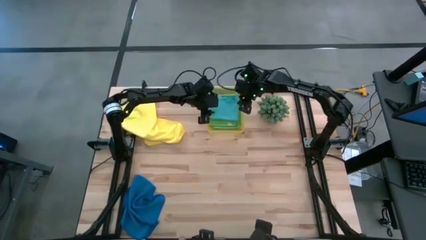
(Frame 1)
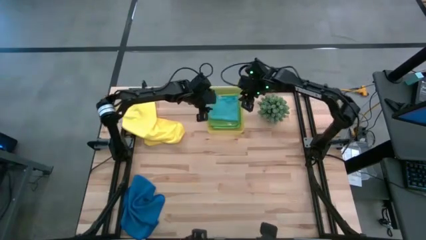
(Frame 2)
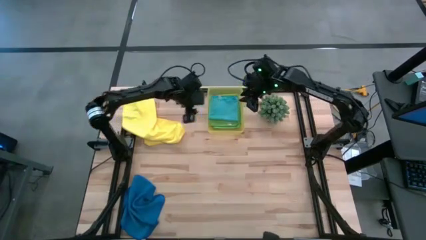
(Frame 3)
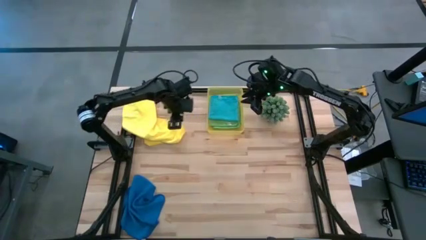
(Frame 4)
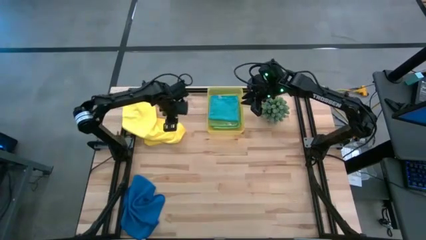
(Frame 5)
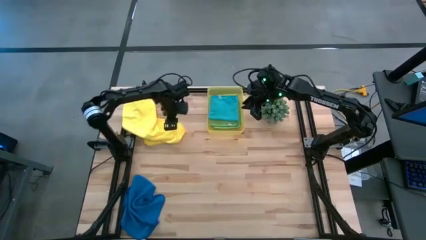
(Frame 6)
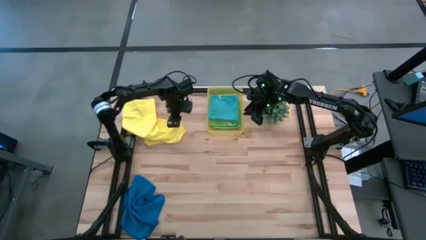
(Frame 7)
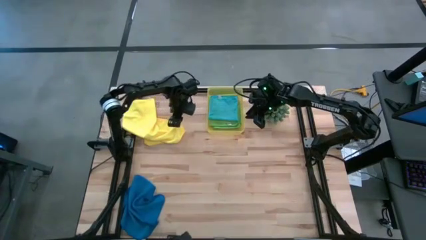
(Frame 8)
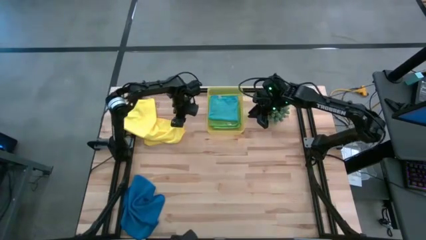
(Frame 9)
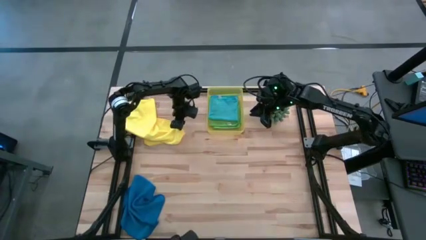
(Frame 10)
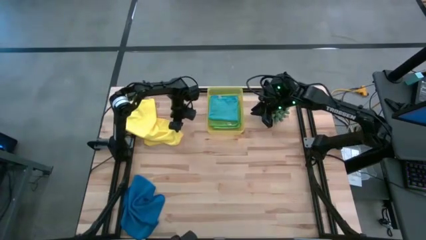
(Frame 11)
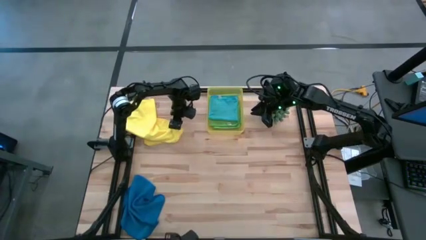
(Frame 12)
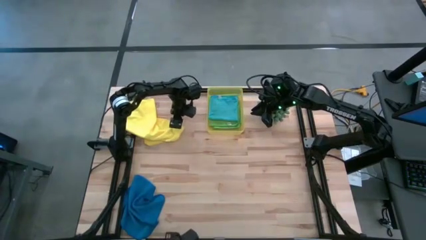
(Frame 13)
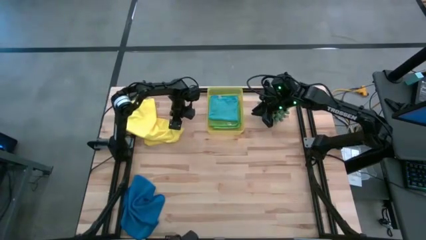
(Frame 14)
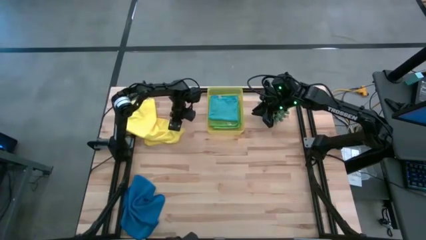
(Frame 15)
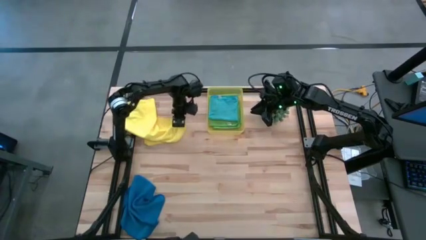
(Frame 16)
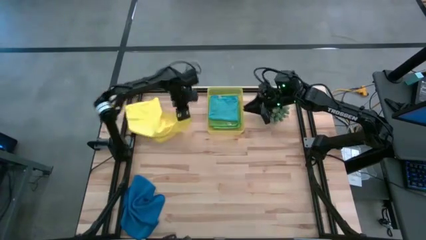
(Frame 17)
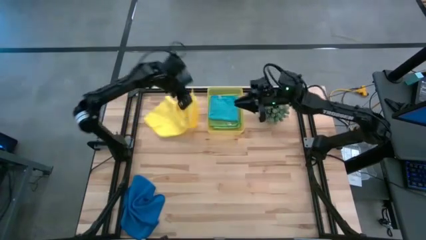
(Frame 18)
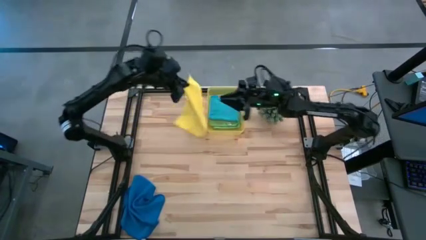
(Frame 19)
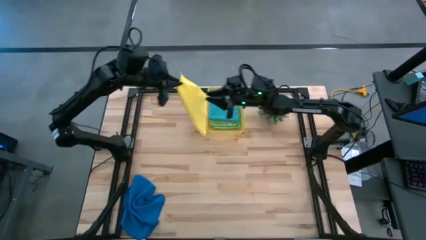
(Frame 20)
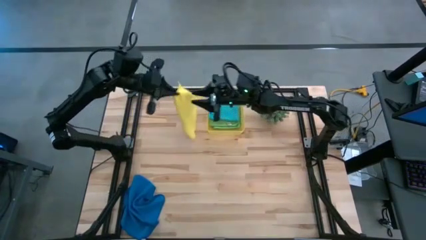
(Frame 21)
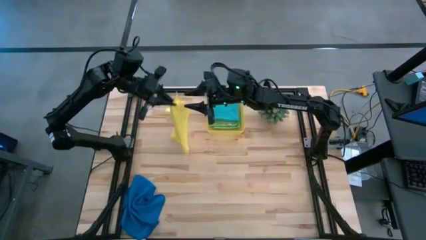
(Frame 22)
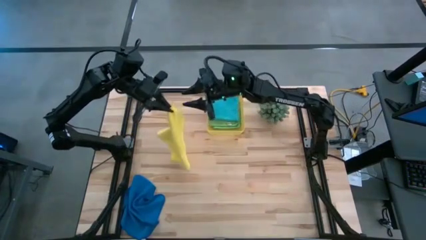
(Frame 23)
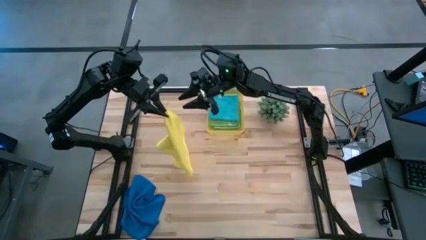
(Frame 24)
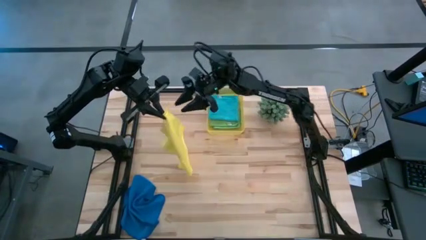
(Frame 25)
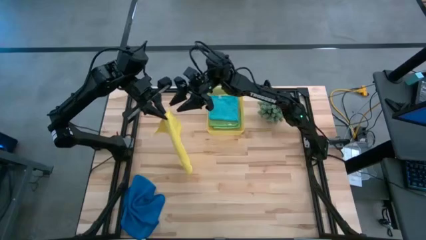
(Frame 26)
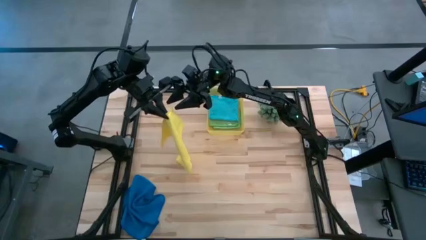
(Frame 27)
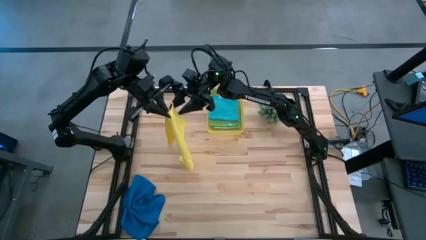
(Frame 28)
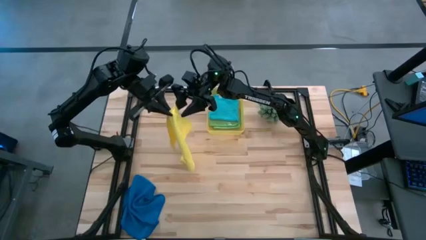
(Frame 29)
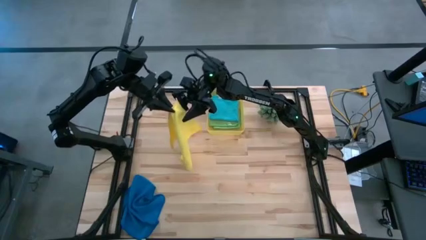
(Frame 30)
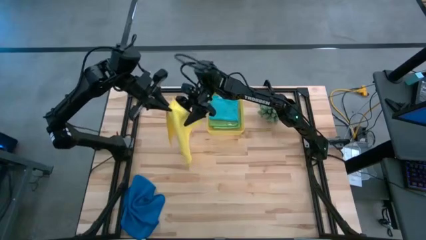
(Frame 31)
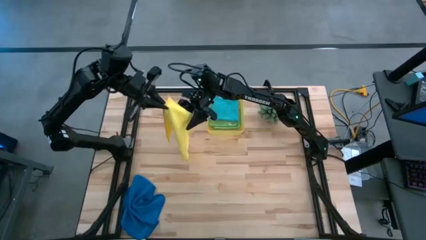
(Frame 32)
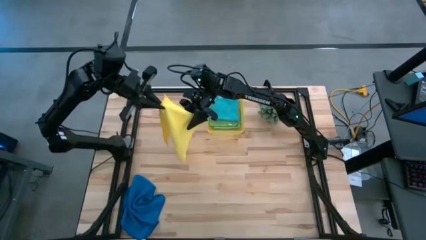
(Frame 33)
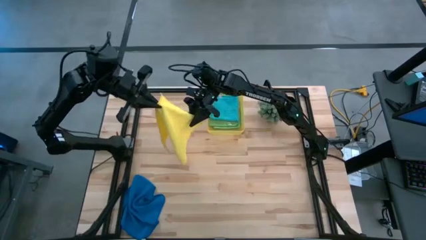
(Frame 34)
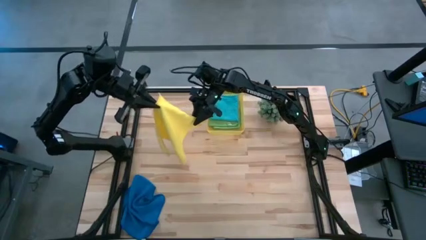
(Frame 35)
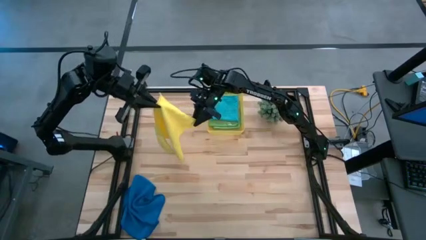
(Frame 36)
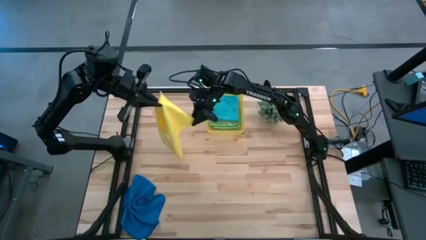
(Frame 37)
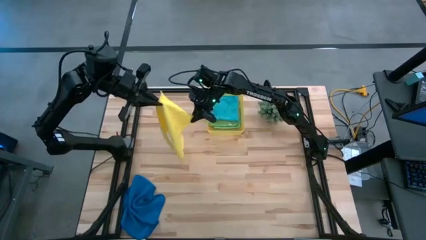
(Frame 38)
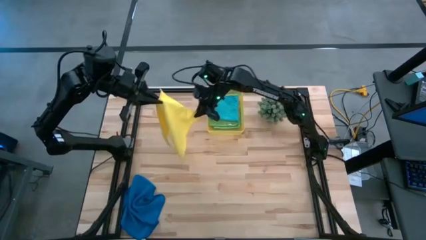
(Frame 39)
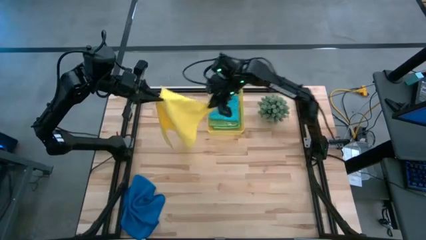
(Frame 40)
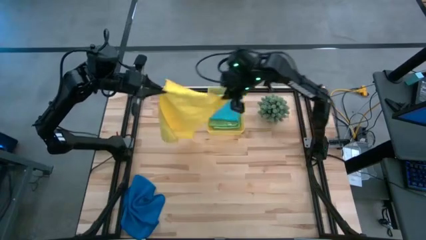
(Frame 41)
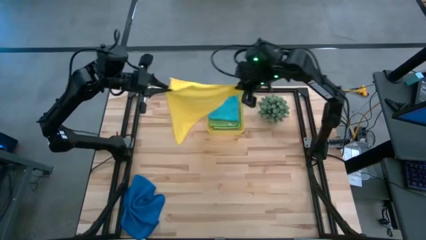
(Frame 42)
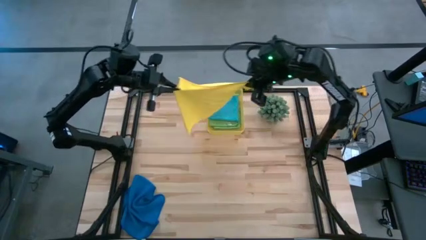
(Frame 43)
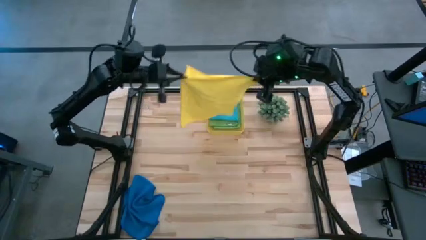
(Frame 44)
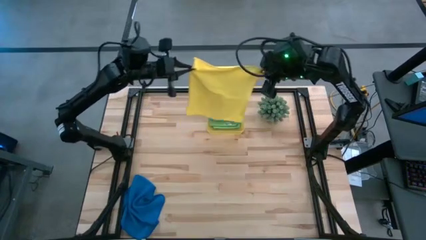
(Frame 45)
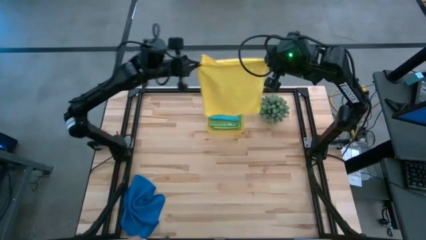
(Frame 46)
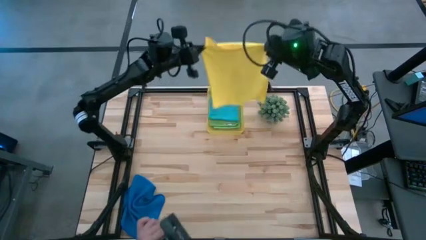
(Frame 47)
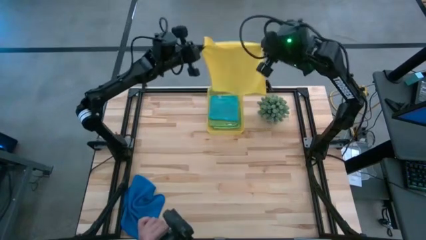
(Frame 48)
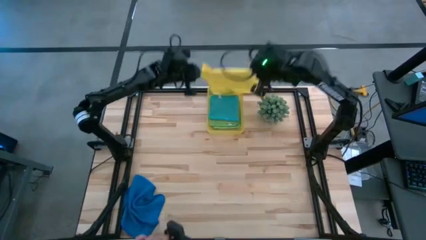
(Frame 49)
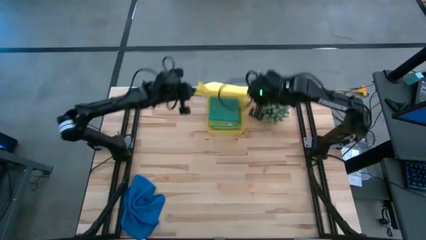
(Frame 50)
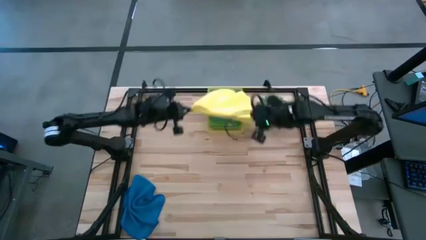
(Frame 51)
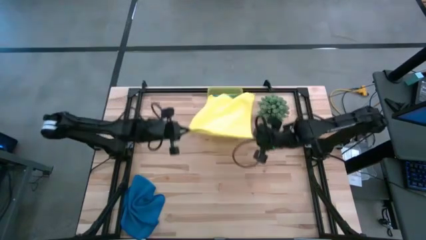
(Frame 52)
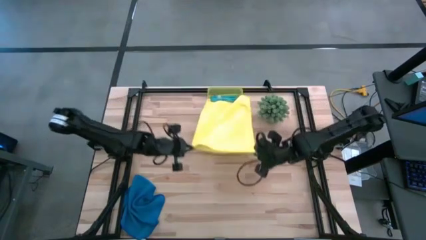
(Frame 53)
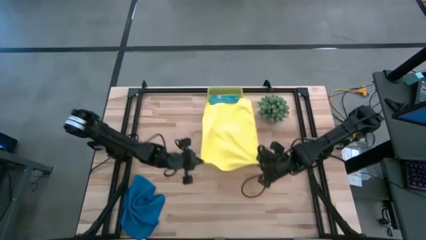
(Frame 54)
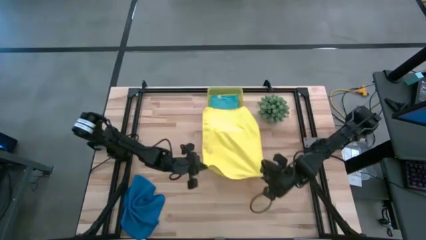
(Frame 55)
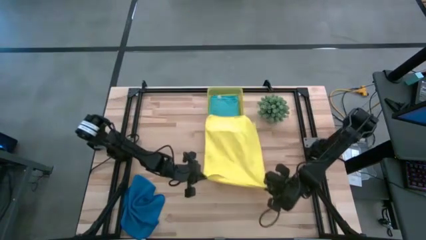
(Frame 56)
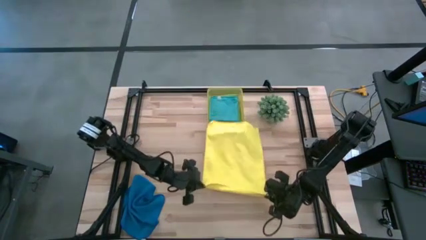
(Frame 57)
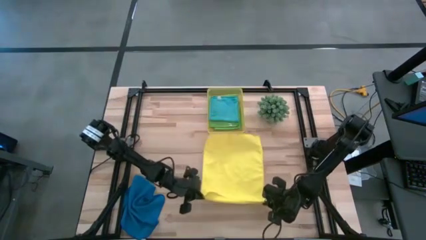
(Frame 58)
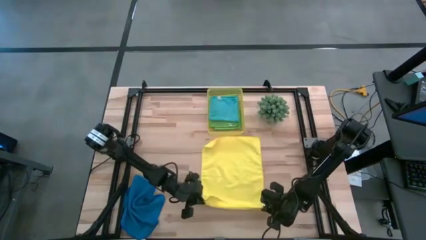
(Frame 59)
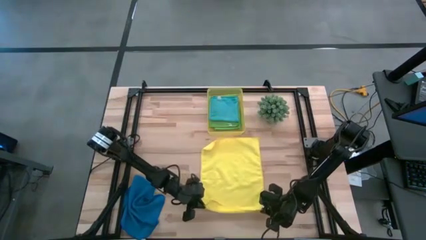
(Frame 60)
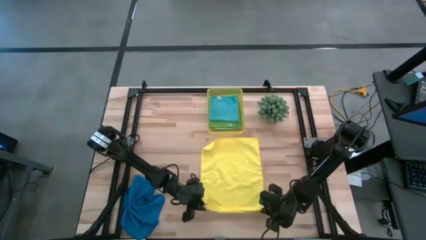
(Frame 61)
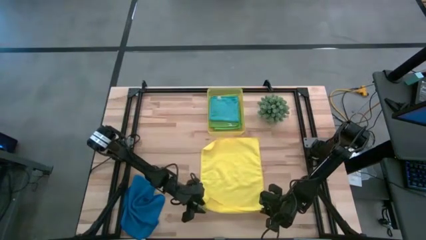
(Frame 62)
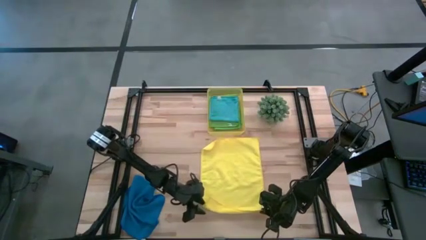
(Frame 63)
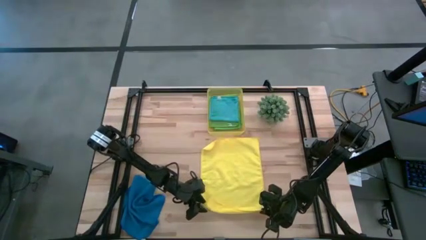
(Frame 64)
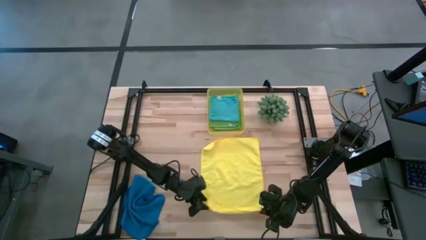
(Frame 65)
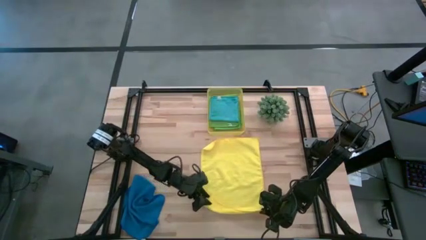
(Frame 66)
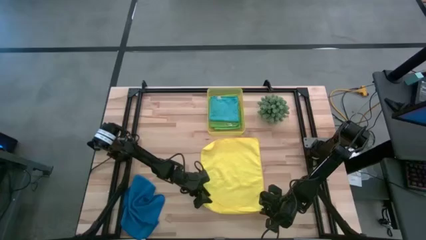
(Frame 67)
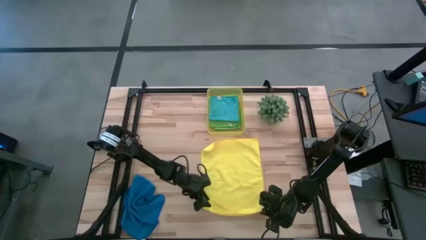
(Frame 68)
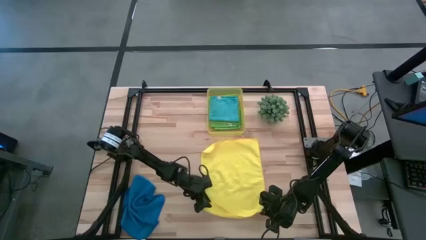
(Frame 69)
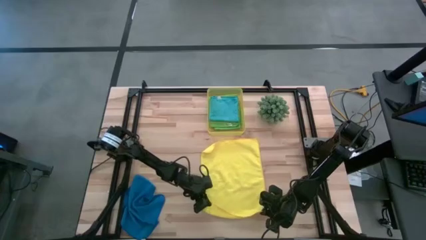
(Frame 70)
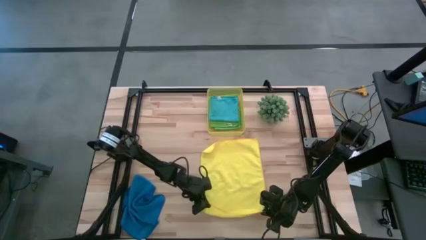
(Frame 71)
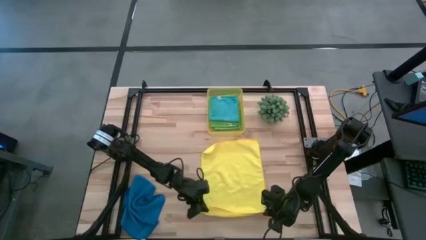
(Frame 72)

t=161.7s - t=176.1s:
Task: Fold microfiber towels
Fold the yellow microfiber cloth

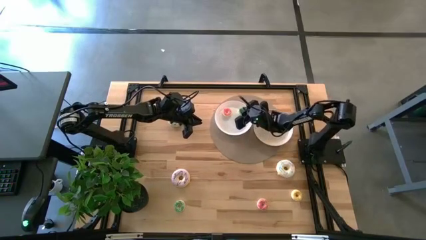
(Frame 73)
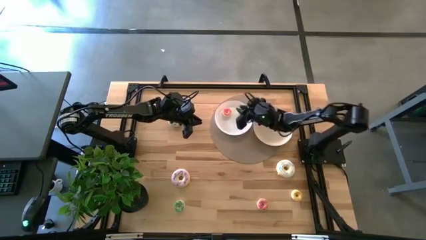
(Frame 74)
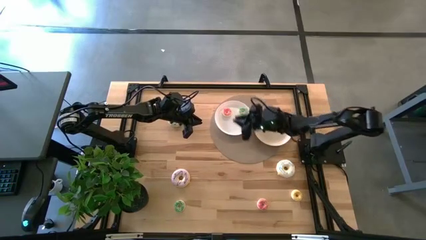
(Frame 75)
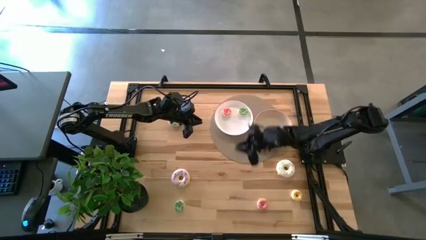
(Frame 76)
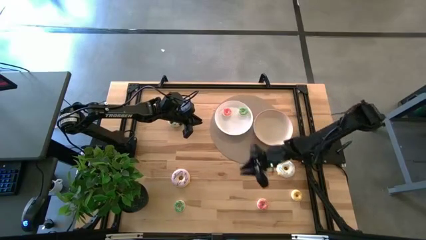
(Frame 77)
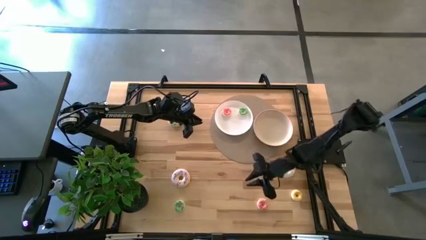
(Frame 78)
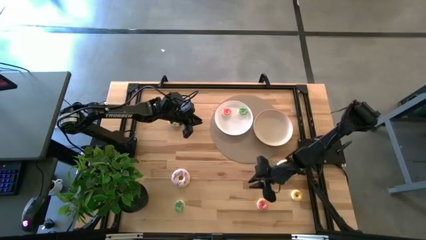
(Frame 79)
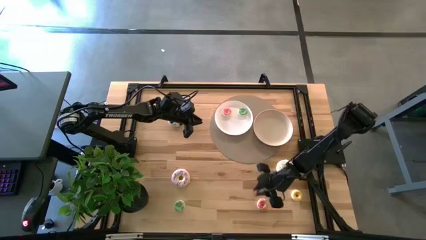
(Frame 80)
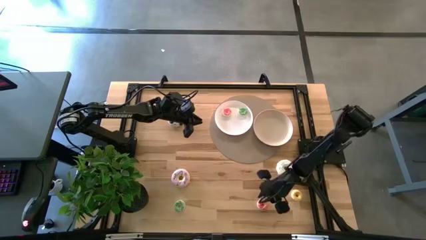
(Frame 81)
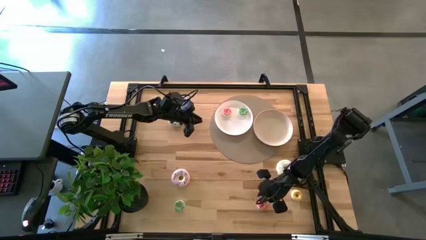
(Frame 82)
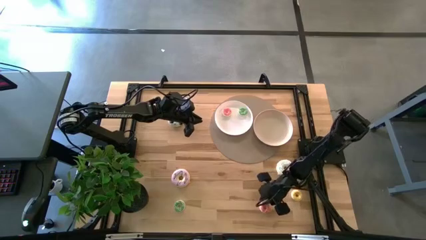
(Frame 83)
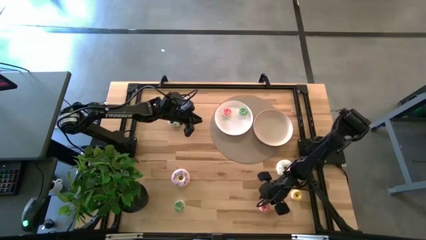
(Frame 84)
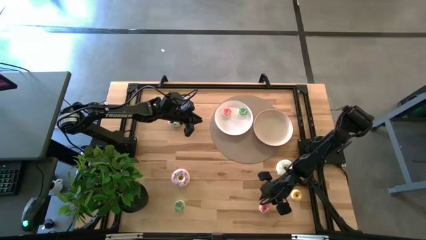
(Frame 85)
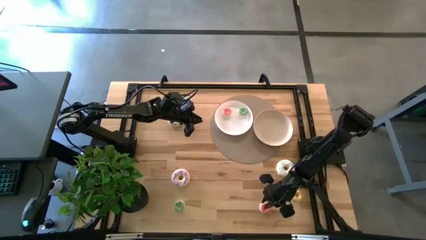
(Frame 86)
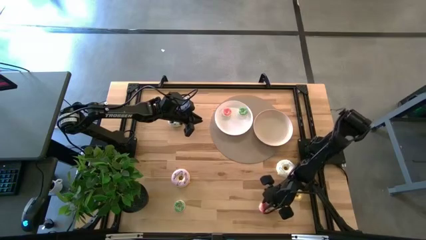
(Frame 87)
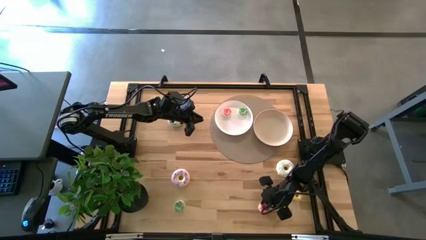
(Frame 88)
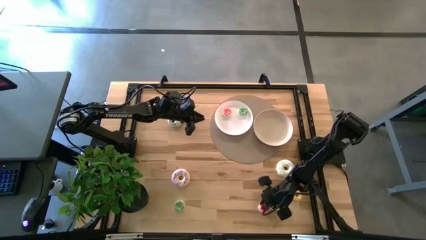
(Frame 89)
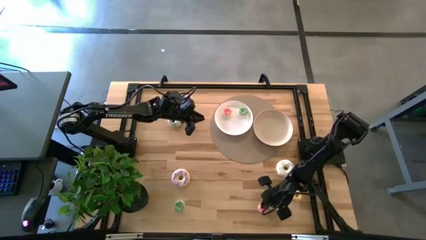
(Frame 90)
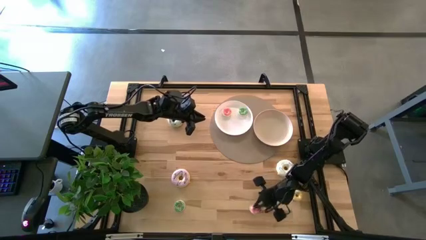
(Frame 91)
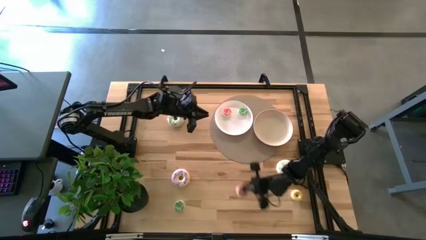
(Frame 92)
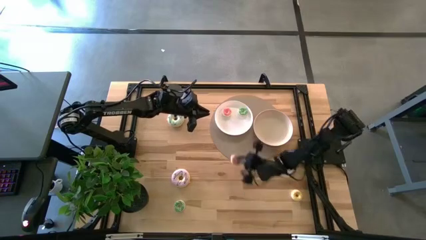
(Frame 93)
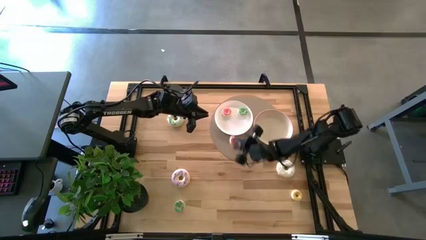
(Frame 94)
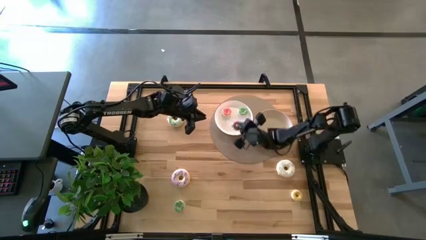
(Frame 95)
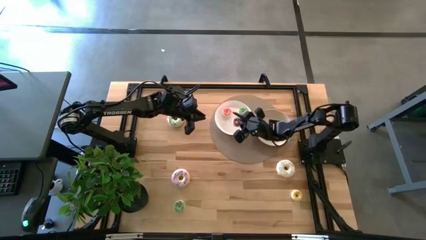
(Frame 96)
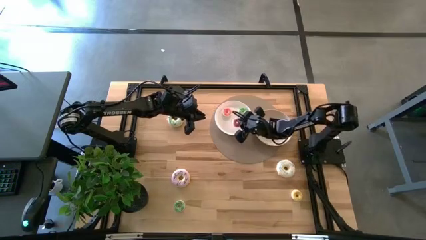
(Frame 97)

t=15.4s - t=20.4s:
Task: Pick & Place donuts
Put the small red donut on the white plate
